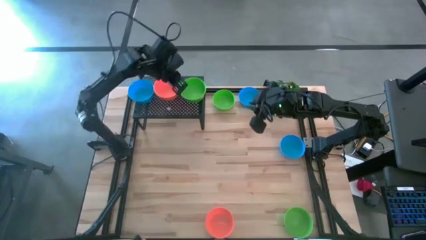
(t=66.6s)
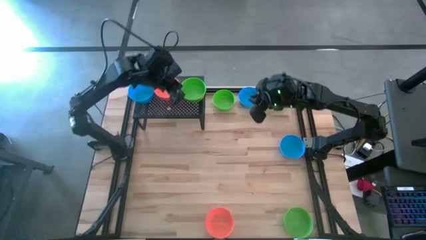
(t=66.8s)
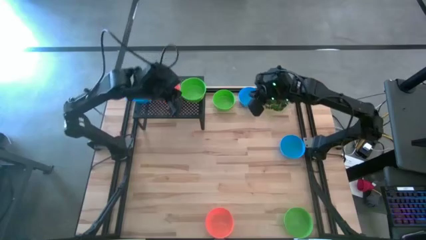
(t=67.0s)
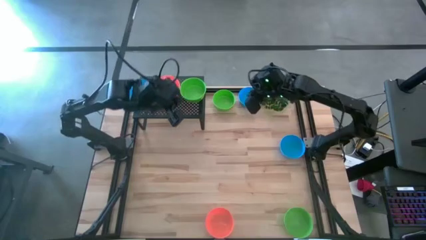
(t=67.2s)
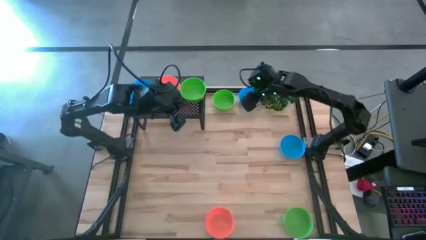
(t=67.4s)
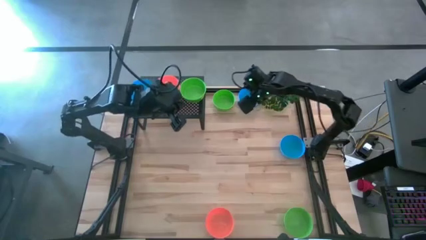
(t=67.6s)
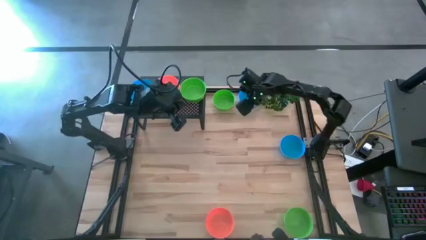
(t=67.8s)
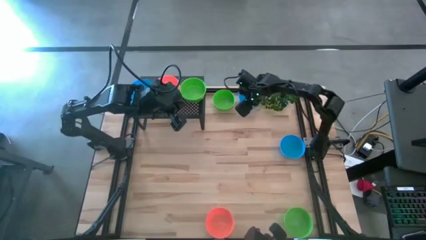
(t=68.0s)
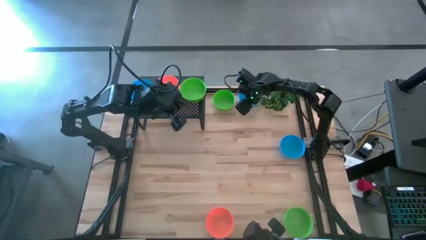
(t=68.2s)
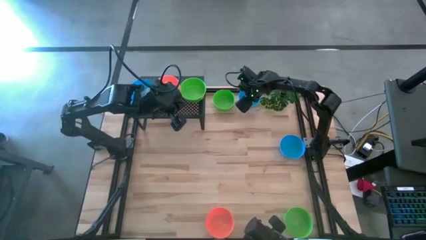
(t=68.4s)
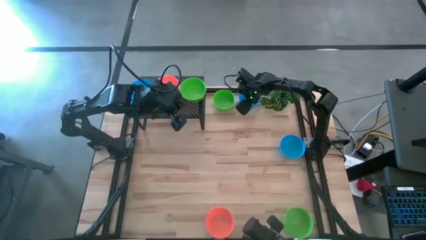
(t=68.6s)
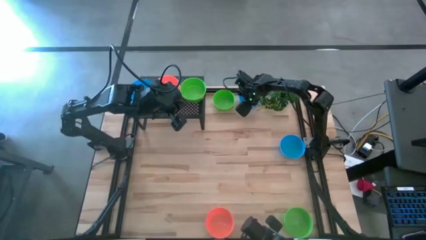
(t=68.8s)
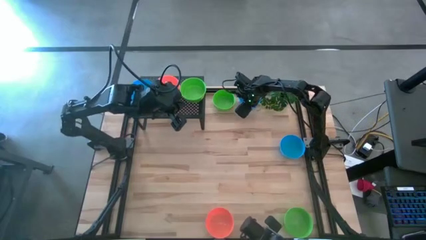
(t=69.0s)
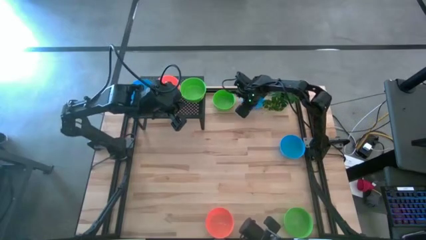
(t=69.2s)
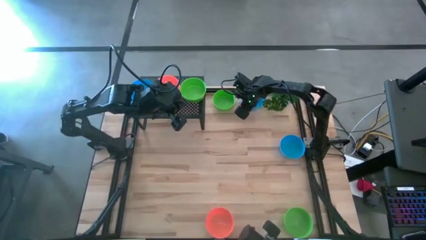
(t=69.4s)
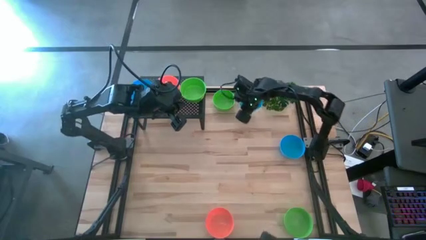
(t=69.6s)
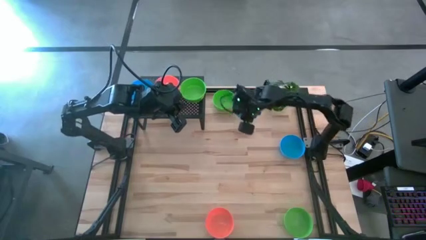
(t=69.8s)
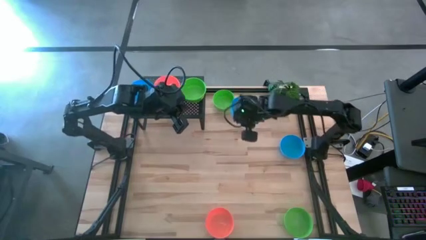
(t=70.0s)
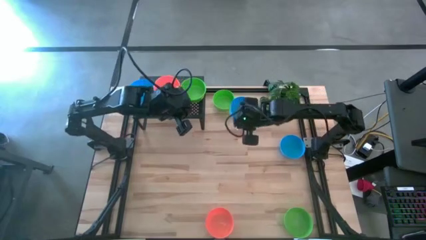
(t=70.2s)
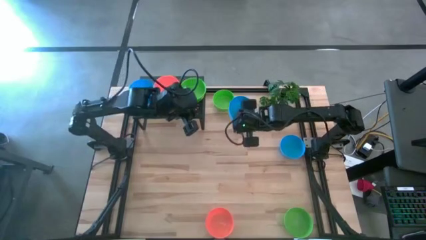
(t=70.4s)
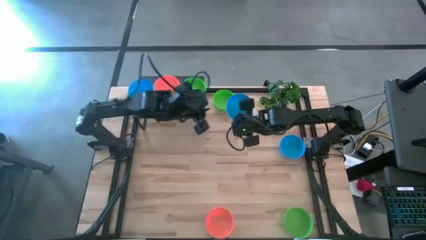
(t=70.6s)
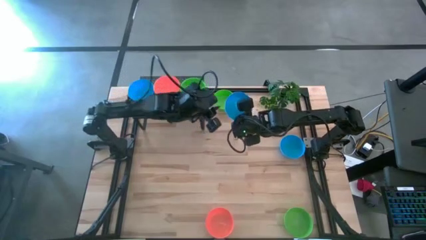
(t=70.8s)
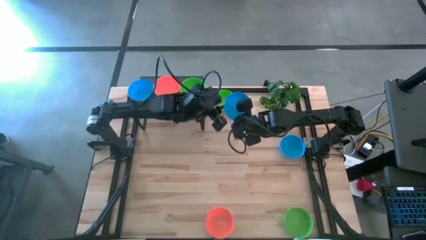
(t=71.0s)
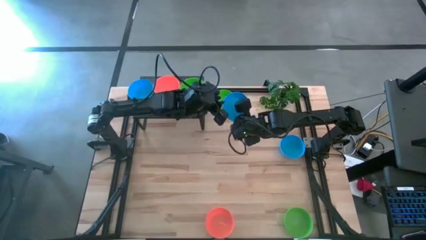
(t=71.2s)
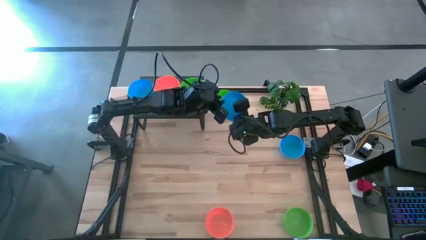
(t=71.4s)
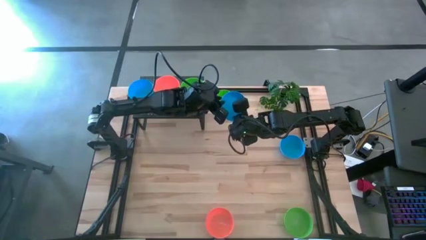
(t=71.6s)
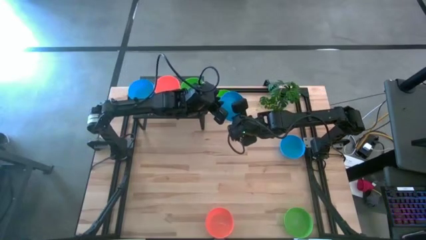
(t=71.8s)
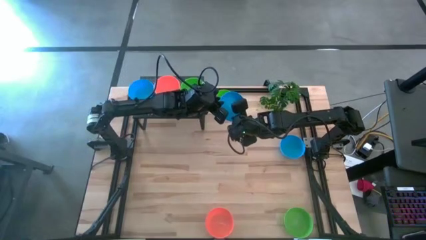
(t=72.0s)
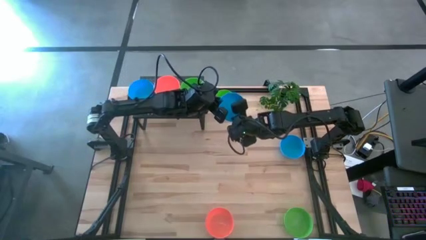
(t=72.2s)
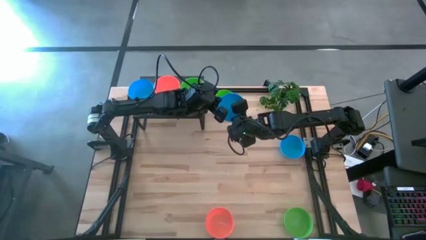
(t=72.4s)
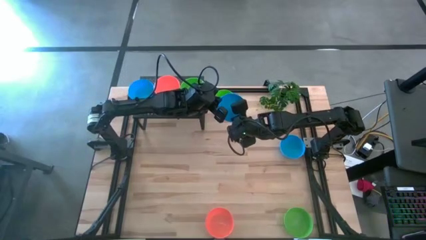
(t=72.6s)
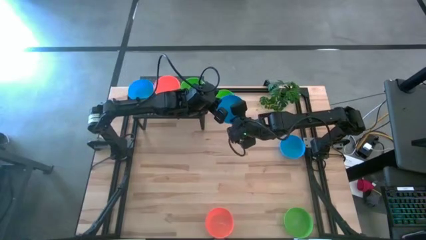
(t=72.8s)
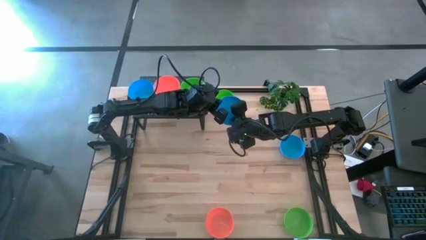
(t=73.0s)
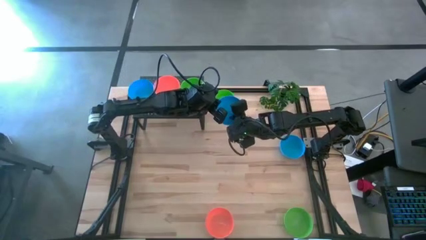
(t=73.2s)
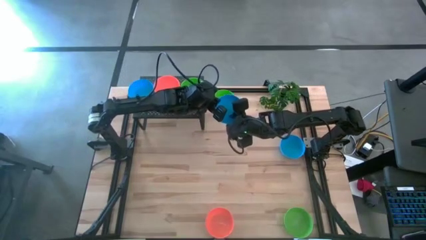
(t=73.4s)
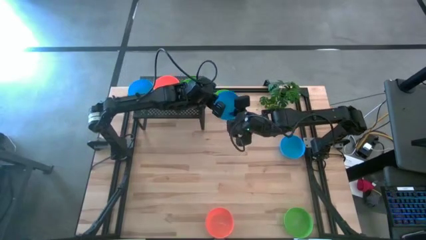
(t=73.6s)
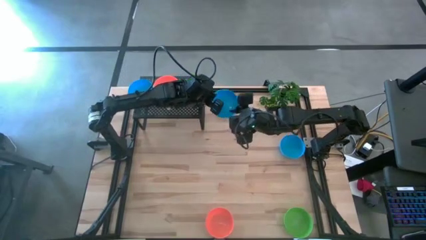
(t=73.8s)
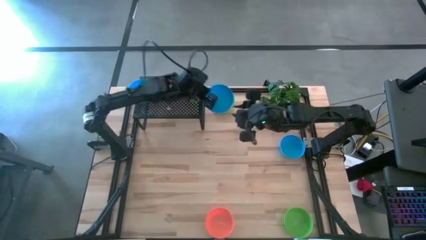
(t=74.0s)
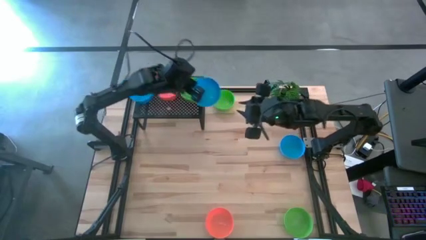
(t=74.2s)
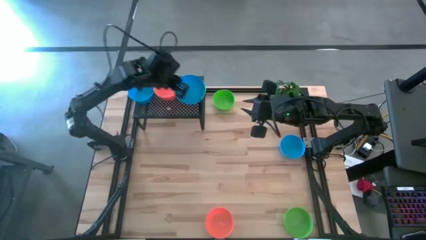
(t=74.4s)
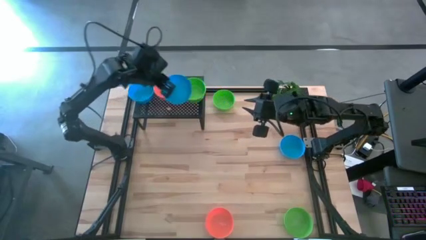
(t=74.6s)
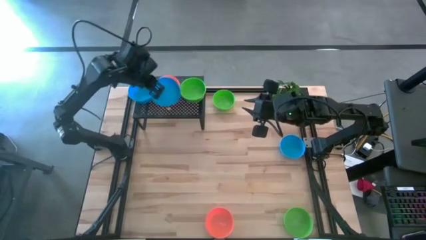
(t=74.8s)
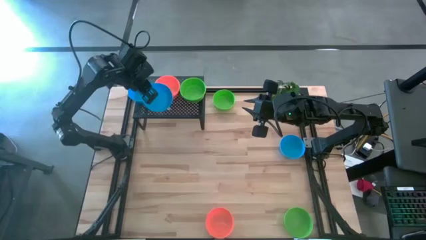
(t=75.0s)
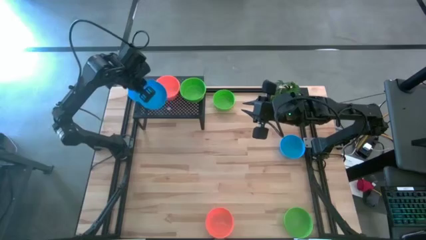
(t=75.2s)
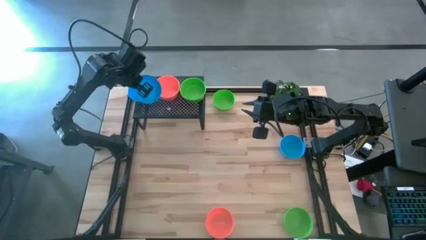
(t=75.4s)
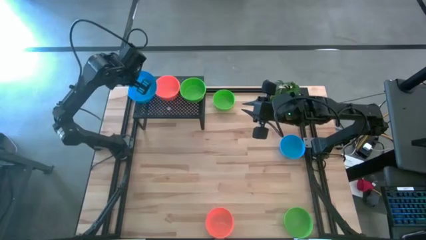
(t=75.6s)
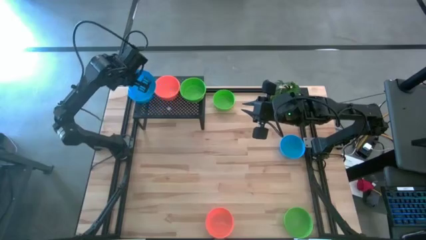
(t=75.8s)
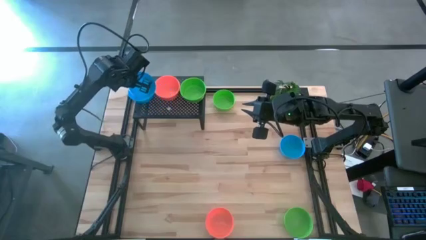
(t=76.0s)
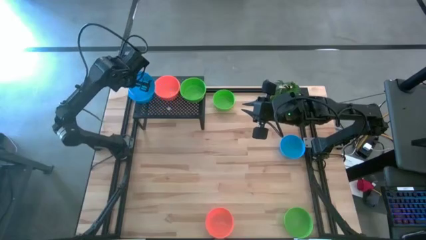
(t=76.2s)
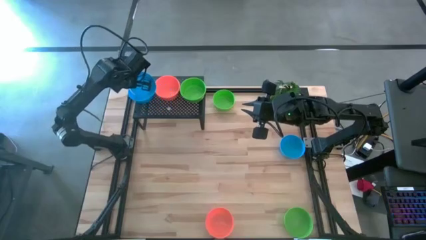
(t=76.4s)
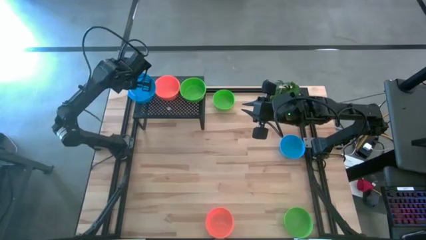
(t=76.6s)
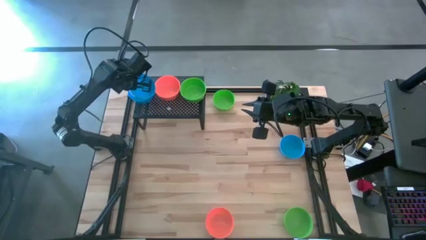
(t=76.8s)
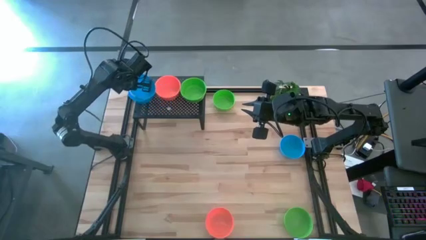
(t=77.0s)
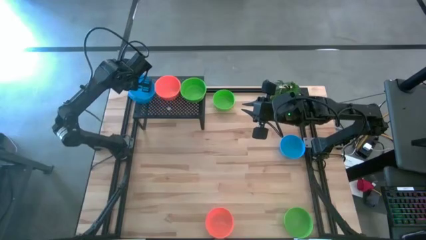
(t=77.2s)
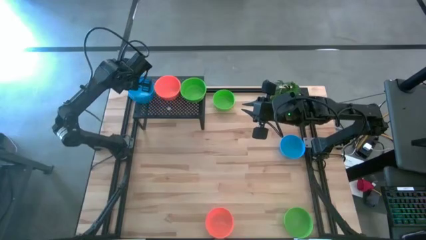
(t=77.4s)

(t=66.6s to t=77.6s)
Task: Pick & Place Mini bowls
Stack the blue bowl on top of the blue bowl on the shelf

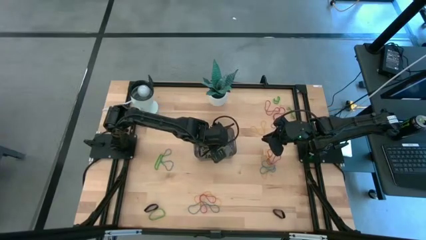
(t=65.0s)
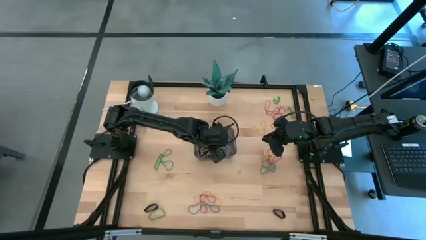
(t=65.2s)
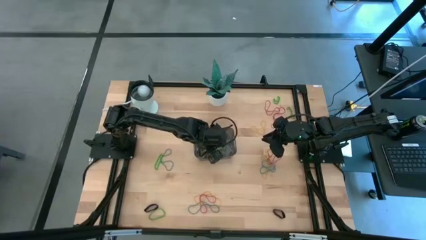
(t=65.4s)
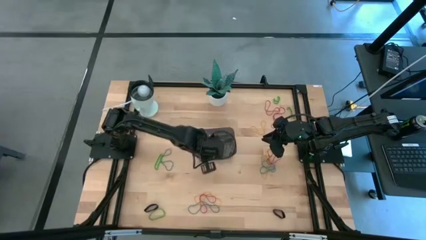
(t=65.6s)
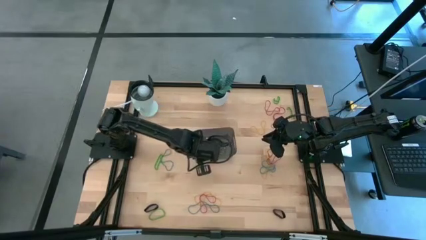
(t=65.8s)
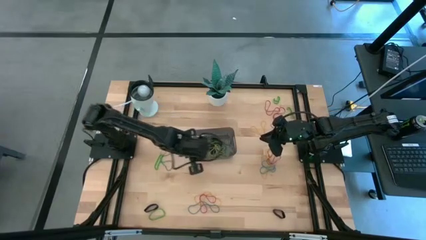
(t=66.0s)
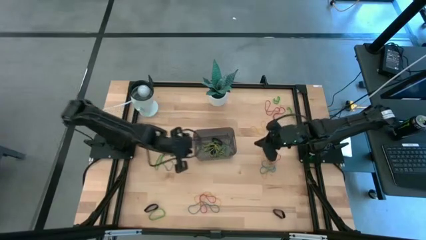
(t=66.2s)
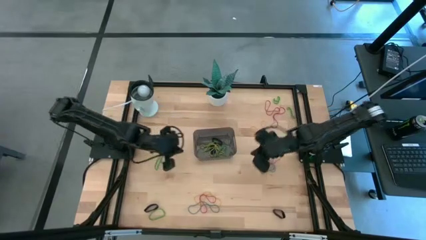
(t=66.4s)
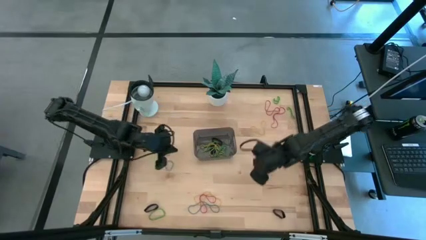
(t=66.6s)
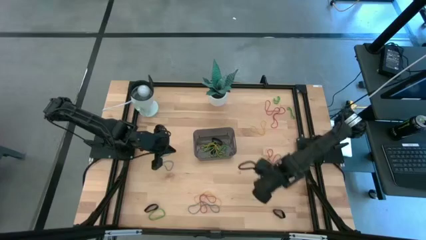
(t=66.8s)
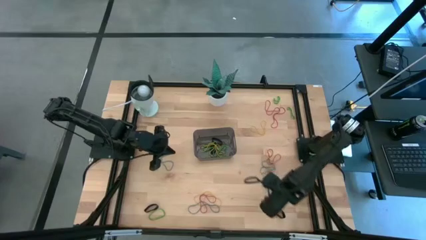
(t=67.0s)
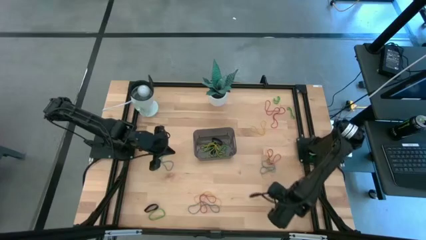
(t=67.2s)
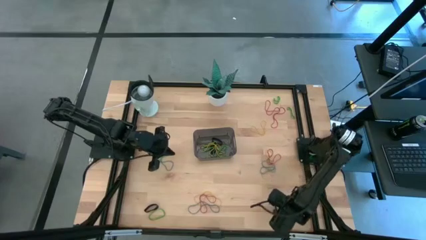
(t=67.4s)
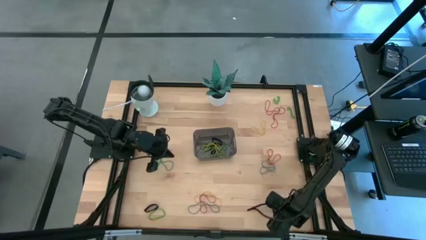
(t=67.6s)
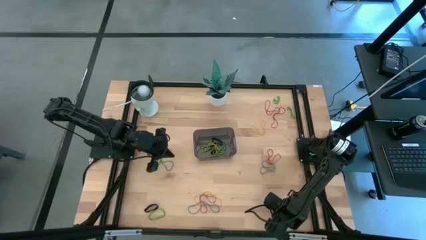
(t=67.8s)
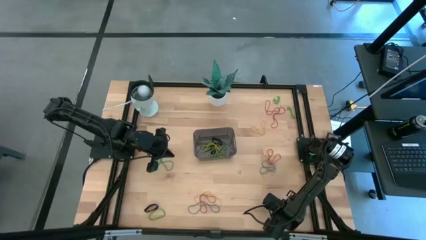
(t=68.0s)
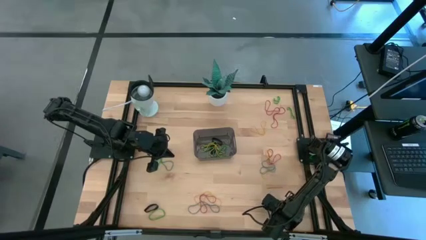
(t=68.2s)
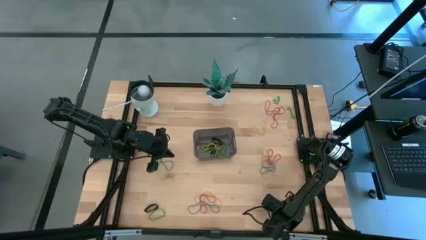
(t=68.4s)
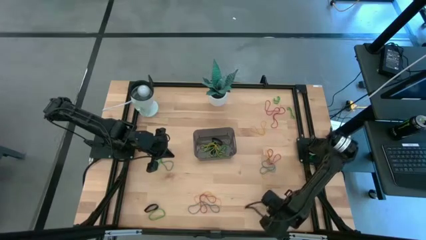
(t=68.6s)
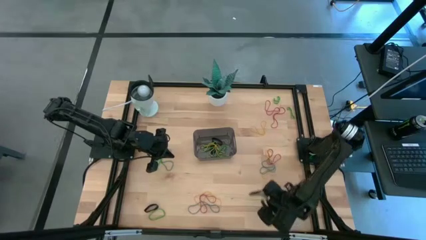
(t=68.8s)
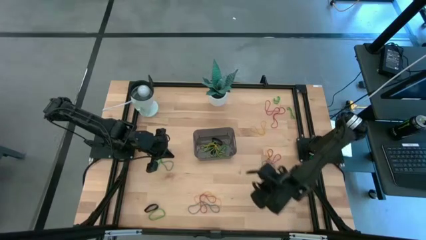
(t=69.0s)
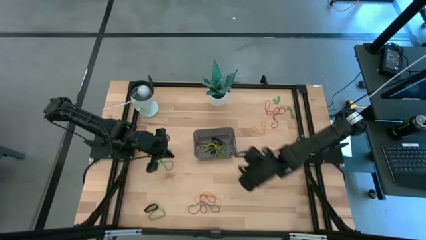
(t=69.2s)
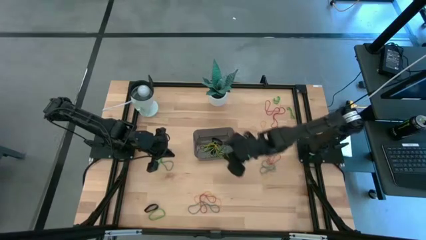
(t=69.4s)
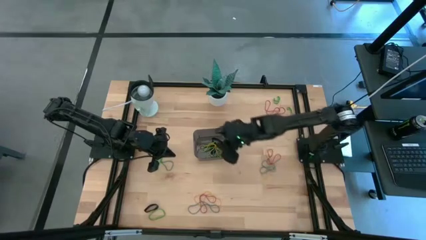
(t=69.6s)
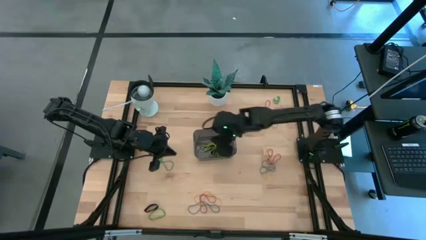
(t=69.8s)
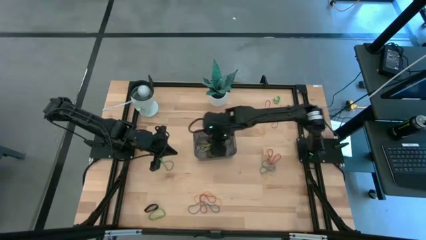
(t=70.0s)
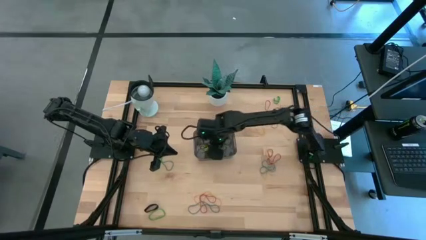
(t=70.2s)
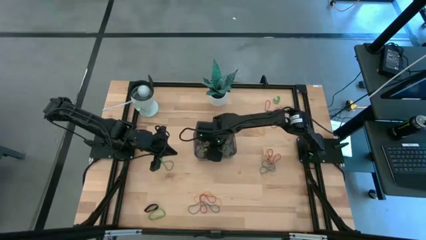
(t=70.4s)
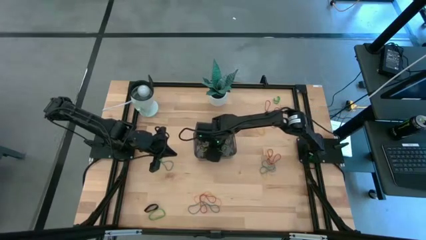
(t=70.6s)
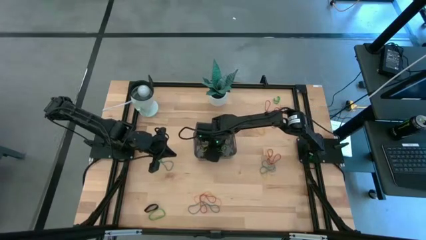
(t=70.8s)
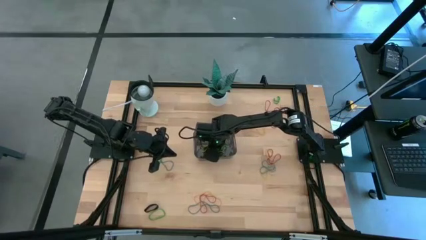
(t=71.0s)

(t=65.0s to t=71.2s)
Task: Pick and place rubber bands into bin
Put the black rubber band into the black bin
